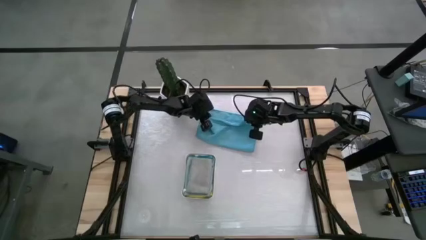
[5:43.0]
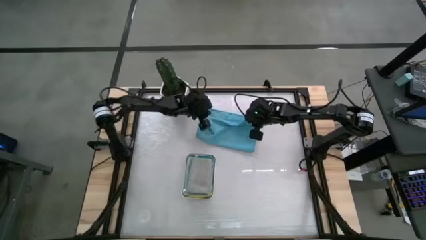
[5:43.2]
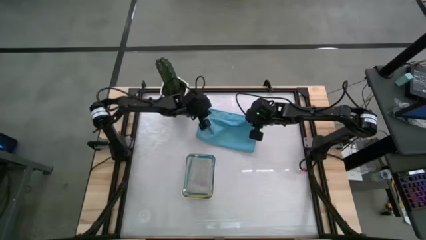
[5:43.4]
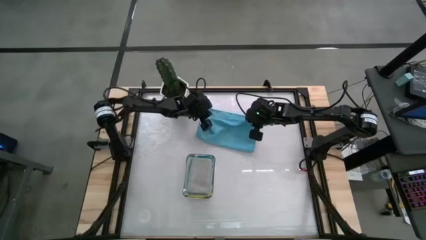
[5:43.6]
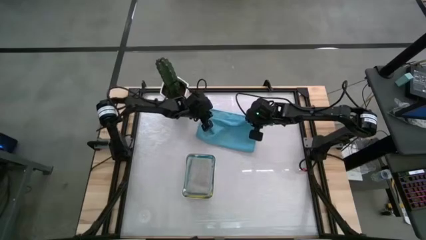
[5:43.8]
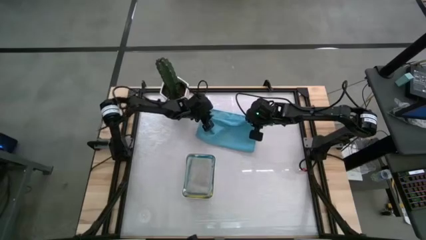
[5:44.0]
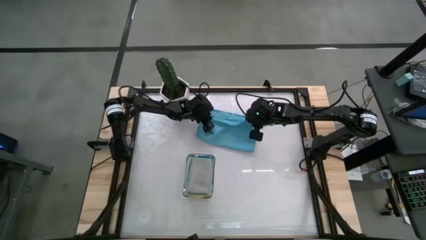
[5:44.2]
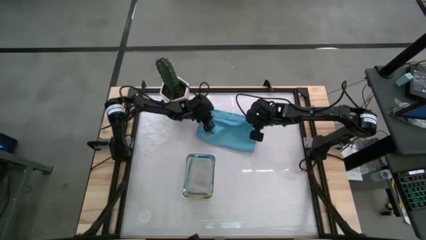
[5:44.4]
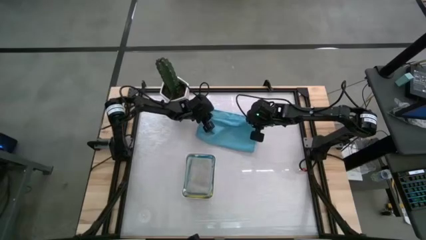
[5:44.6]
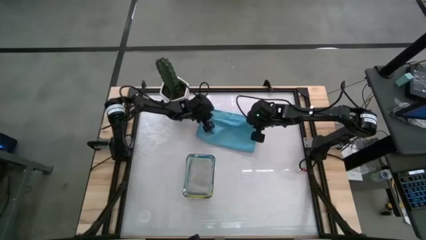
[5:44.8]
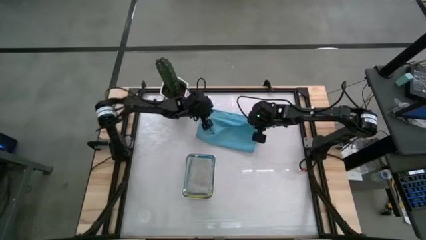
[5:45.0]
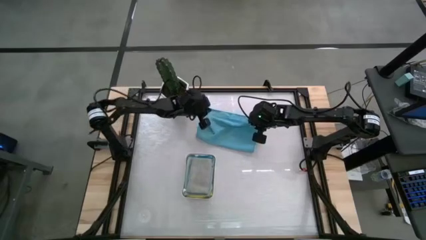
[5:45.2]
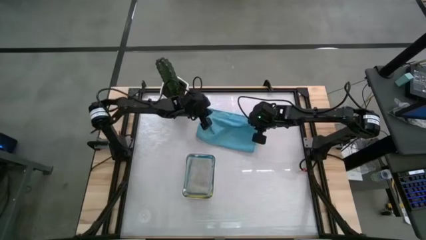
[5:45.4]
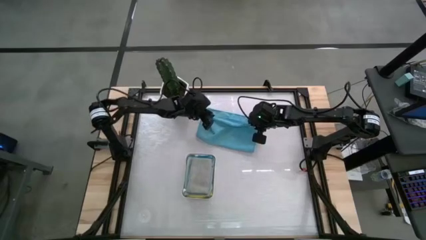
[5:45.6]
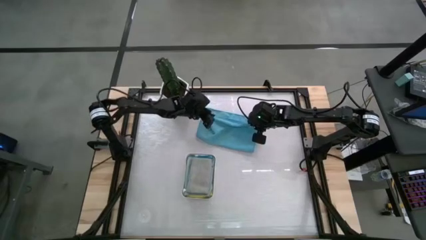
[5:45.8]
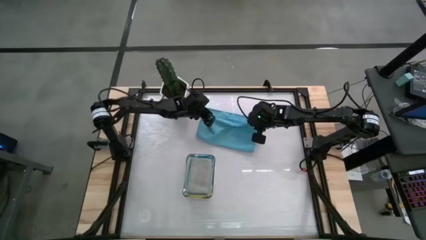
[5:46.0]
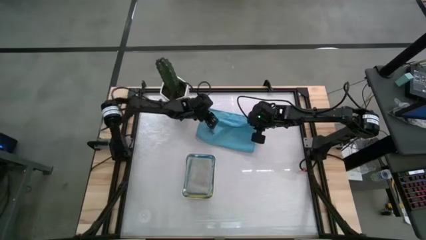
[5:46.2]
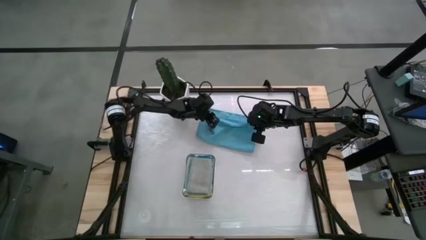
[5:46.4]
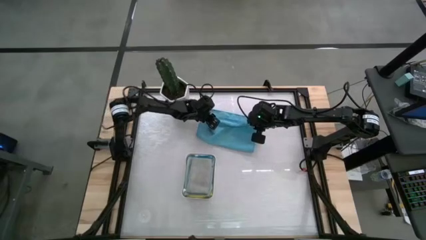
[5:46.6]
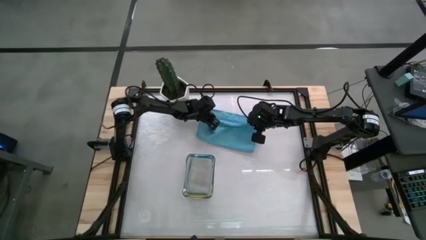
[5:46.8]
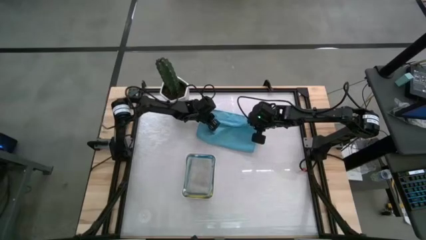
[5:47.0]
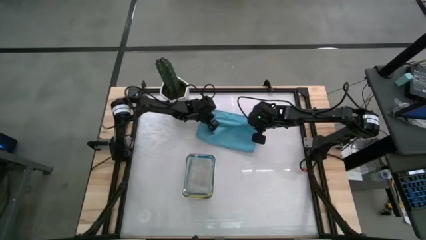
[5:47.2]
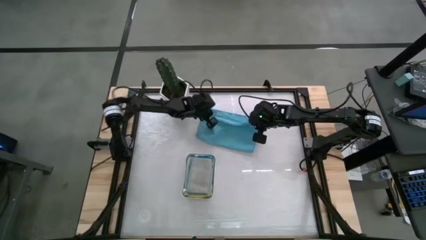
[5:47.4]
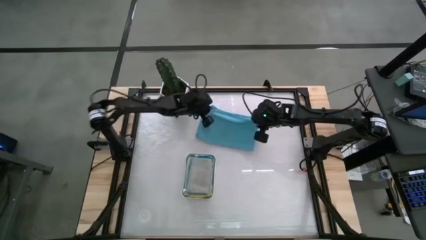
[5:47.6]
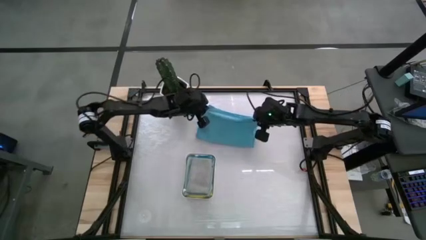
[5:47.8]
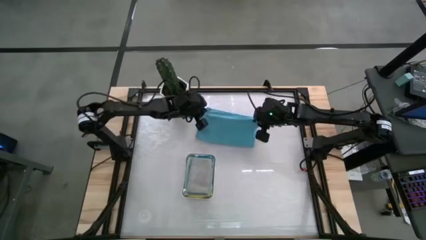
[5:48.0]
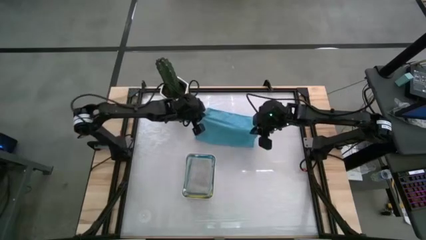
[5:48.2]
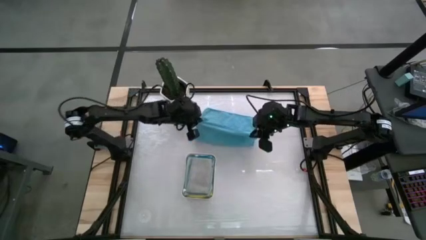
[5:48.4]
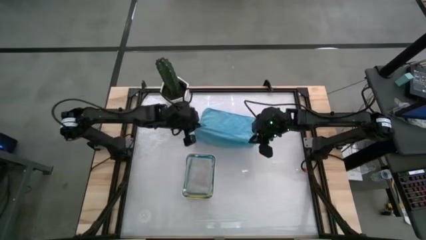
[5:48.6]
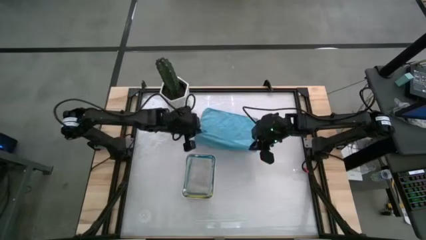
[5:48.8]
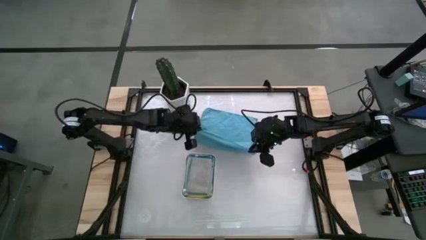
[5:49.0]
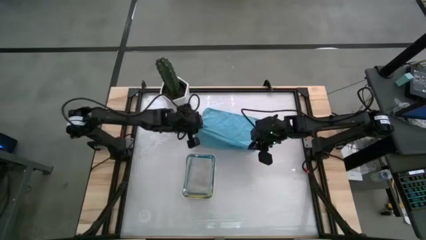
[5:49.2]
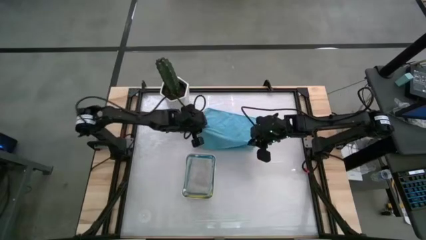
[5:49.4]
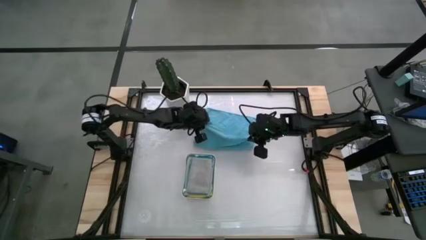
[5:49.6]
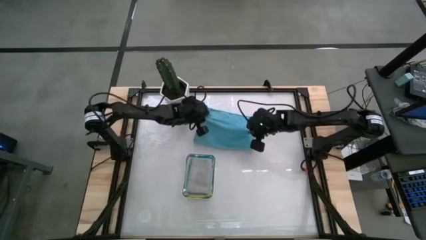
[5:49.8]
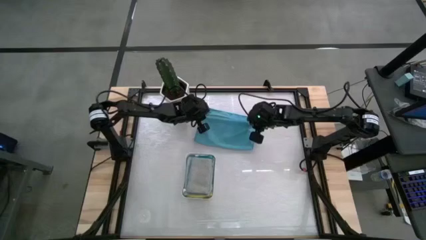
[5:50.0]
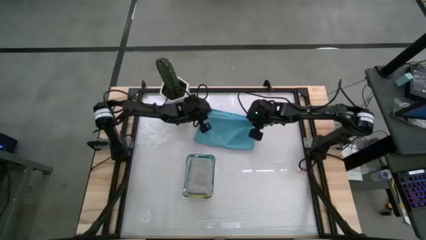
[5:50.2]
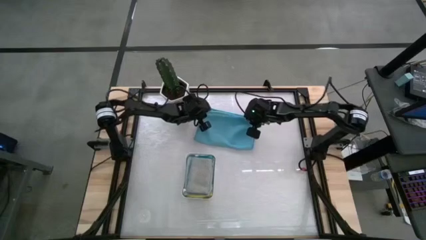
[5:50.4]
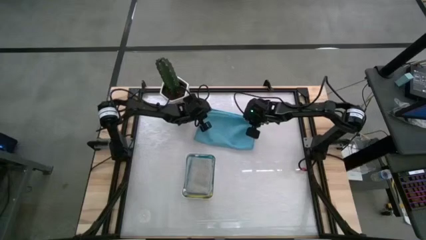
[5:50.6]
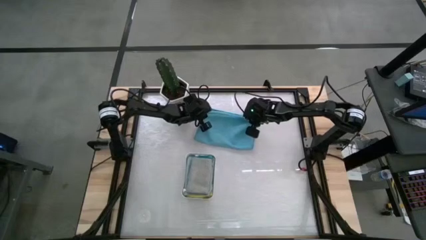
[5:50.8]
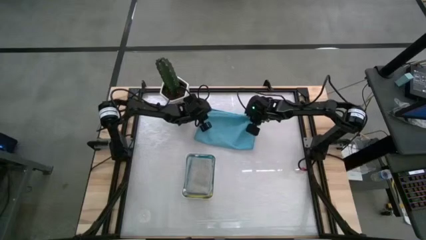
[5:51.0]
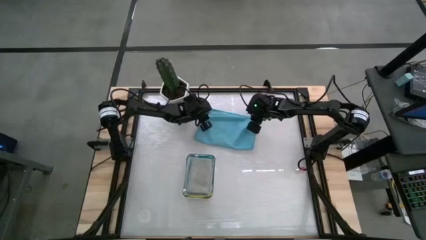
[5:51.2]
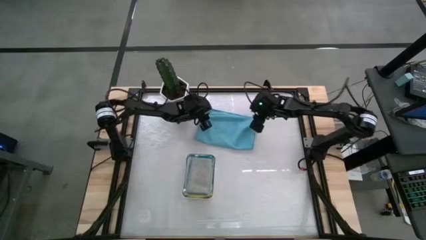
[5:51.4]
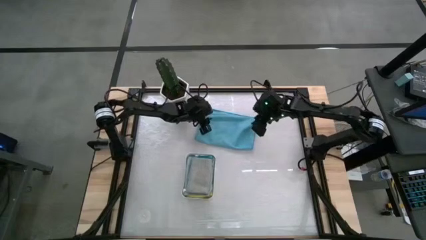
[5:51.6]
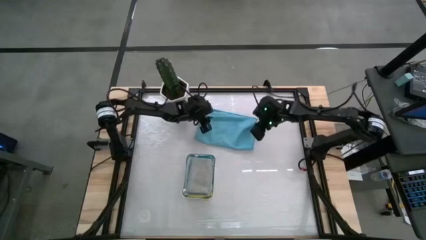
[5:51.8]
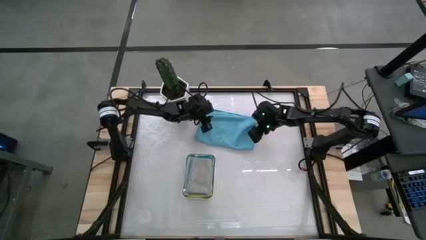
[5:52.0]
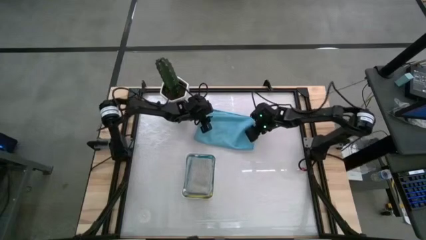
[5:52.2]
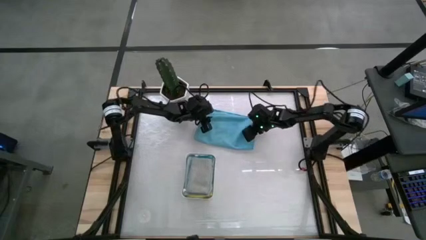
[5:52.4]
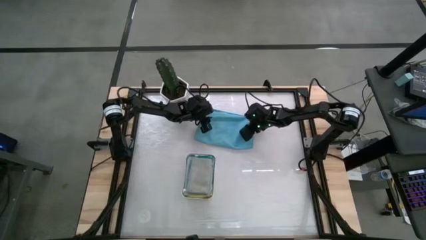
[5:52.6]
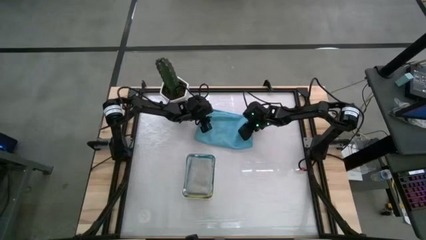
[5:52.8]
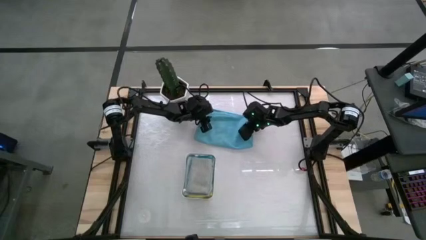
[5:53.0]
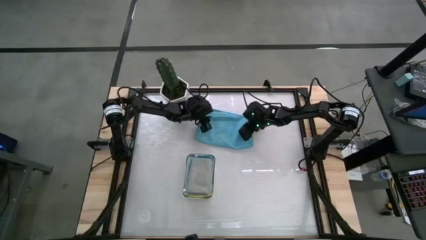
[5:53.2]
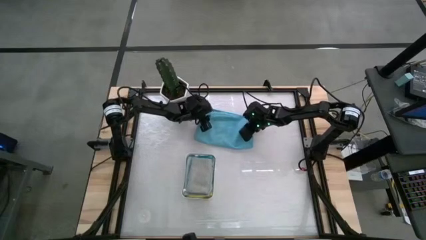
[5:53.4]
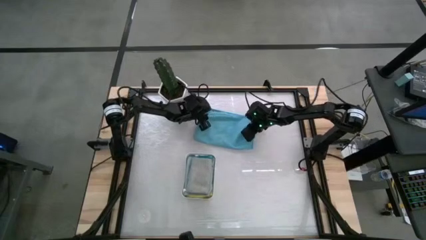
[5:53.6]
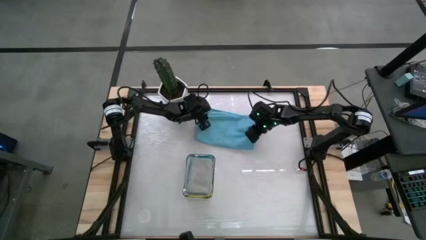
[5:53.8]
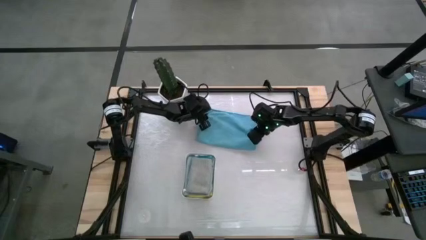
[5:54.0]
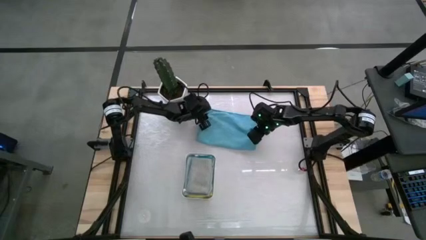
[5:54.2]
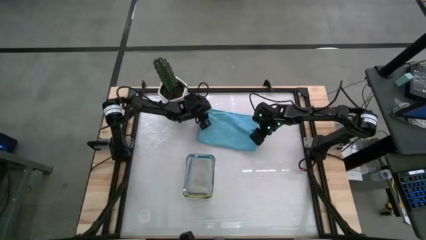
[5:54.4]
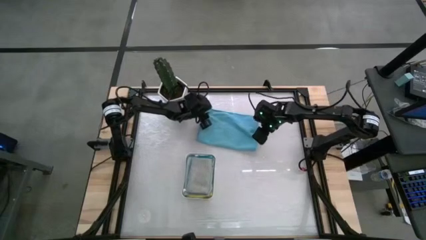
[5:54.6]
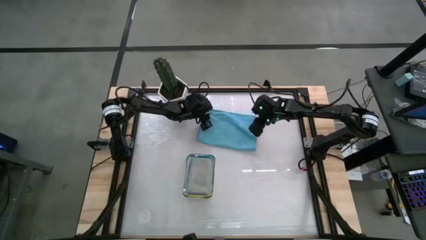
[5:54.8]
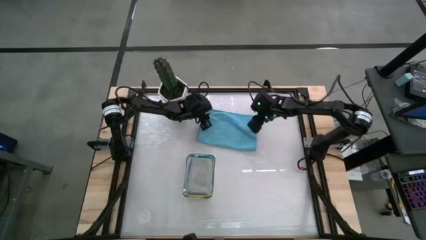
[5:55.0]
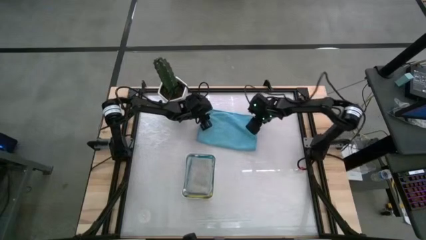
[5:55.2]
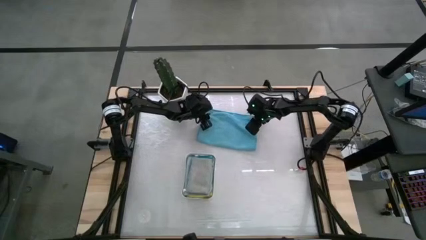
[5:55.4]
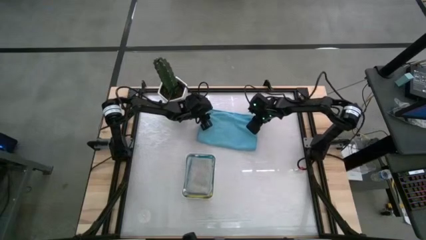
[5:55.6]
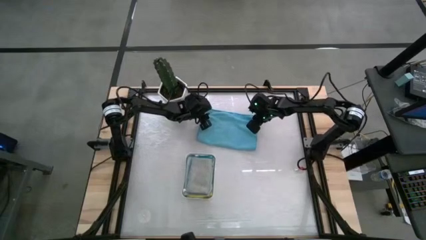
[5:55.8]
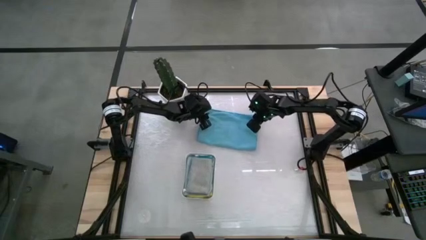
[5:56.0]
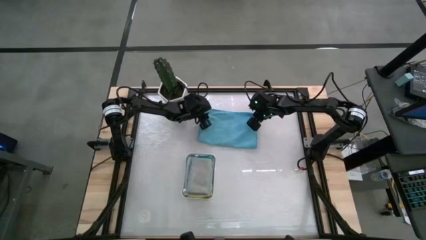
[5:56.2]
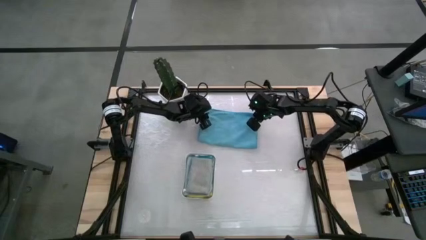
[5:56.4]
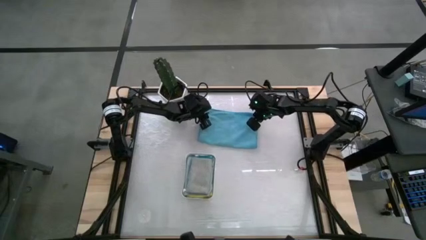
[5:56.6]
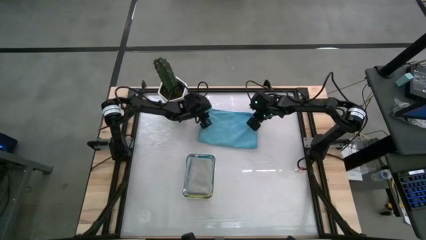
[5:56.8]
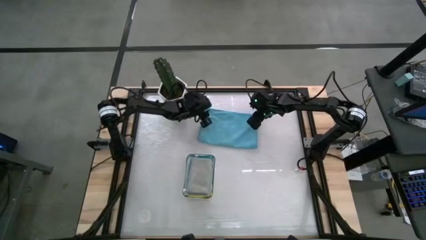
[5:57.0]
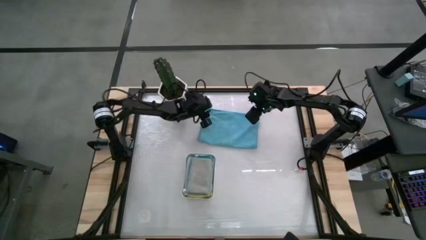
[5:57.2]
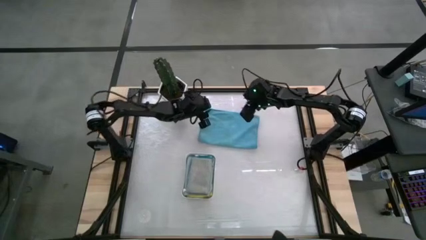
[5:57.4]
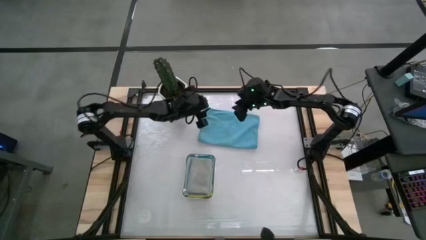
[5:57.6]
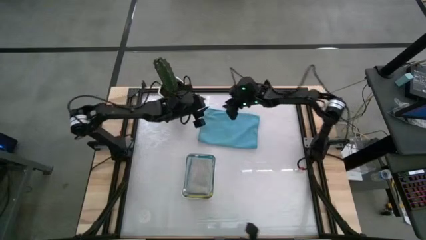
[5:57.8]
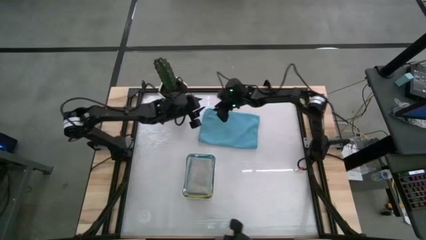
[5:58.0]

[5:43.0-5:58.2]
Task: Fold microfiber towels
Fold the blue microfiber towel
